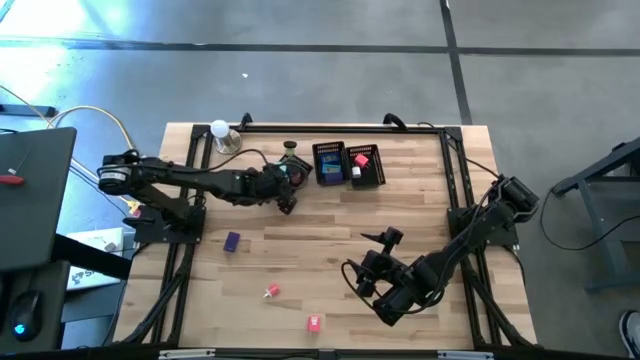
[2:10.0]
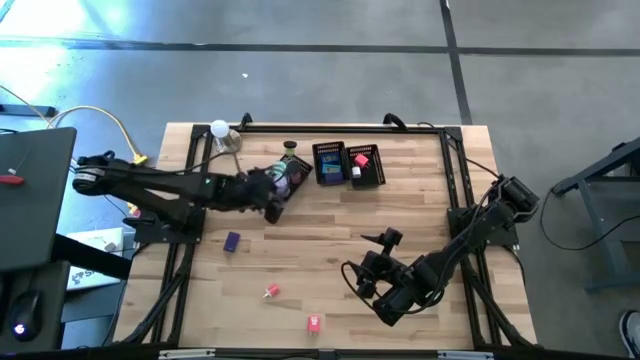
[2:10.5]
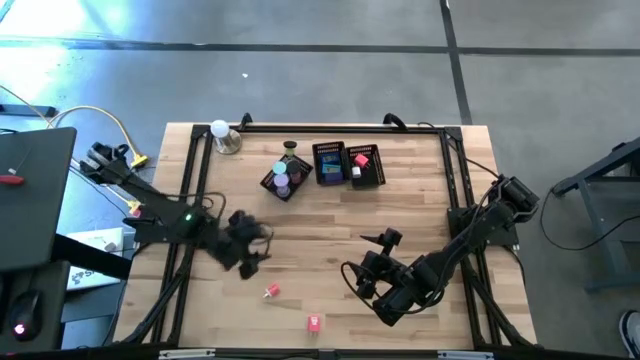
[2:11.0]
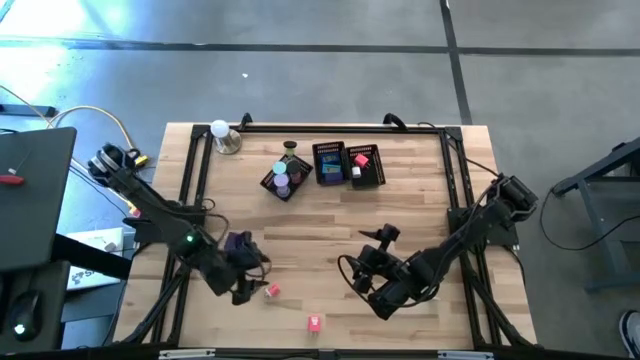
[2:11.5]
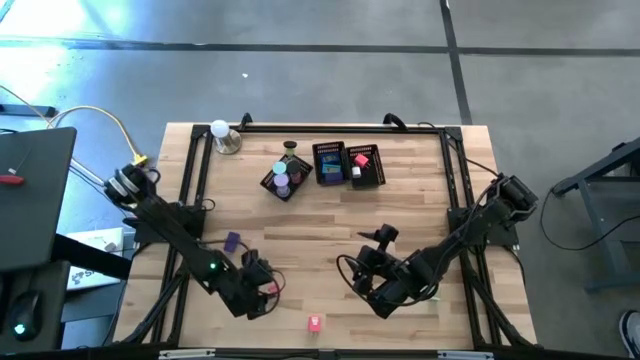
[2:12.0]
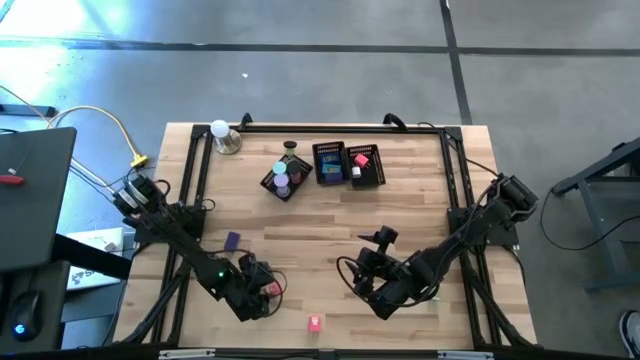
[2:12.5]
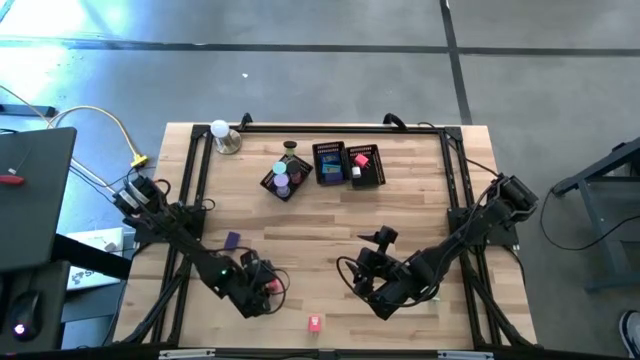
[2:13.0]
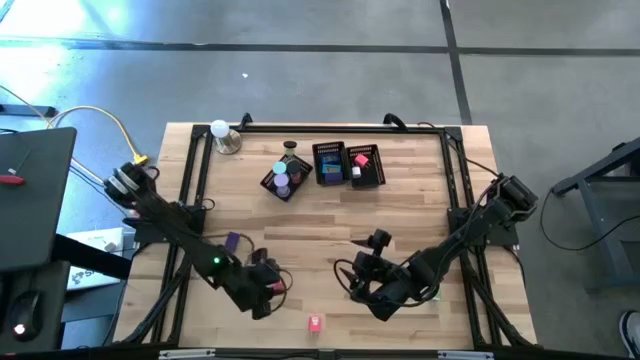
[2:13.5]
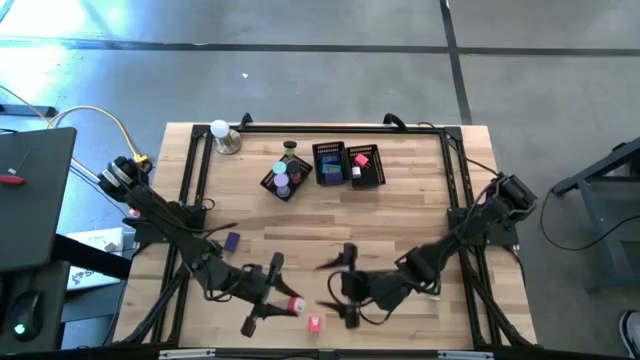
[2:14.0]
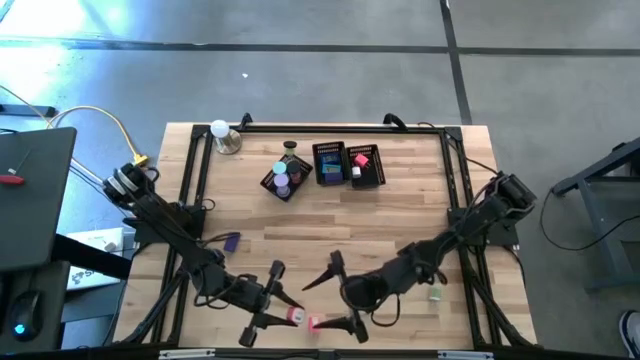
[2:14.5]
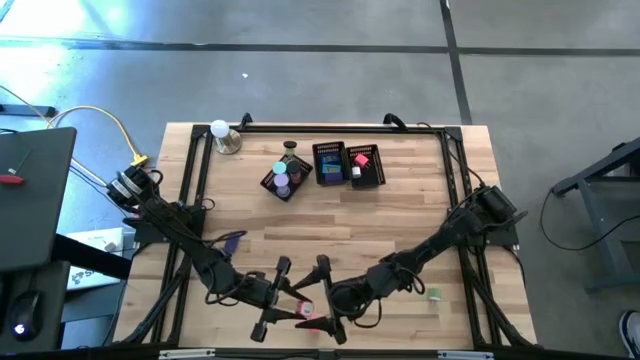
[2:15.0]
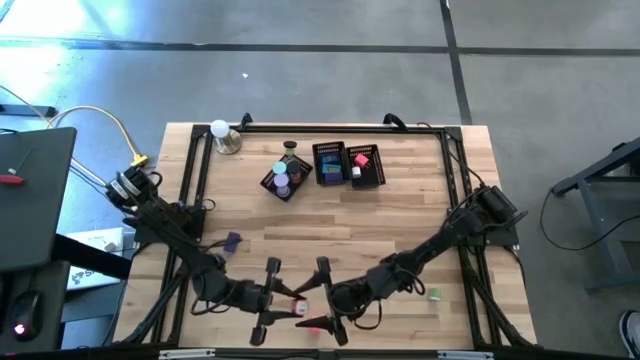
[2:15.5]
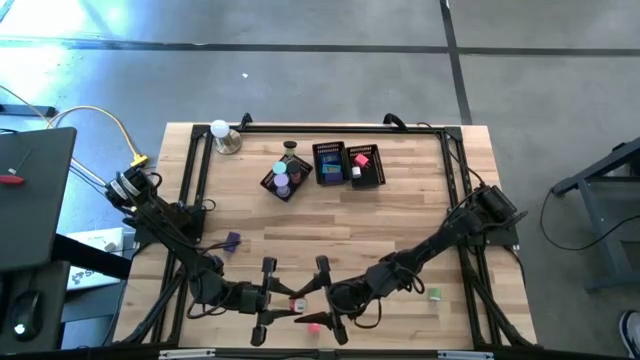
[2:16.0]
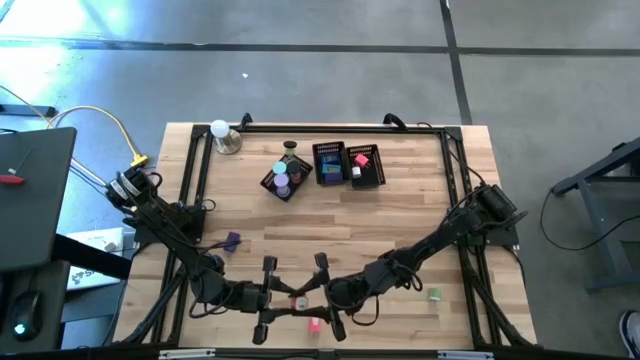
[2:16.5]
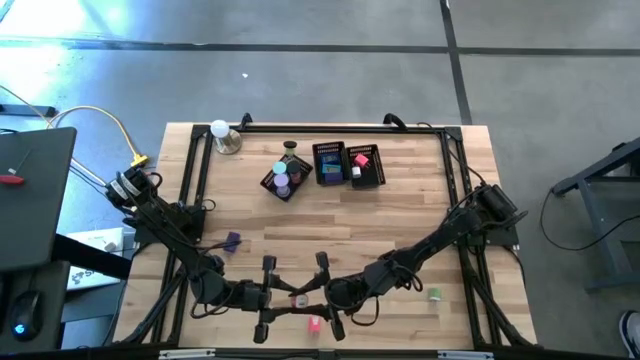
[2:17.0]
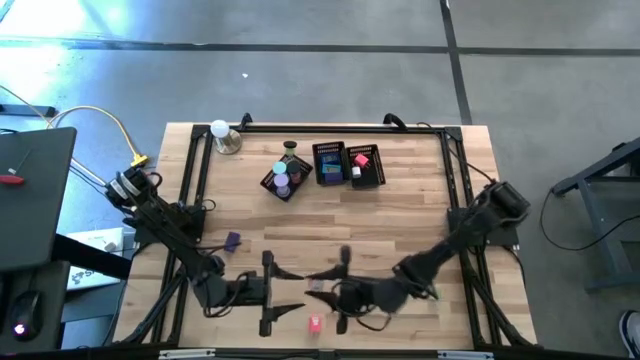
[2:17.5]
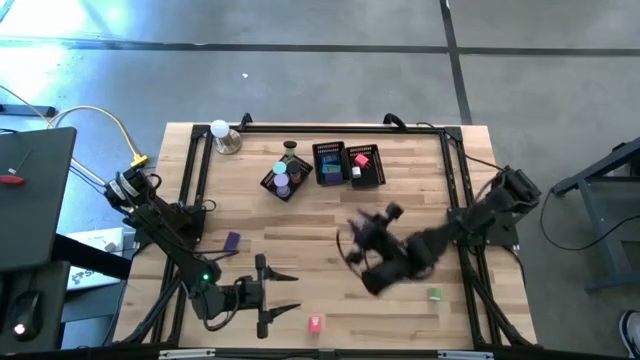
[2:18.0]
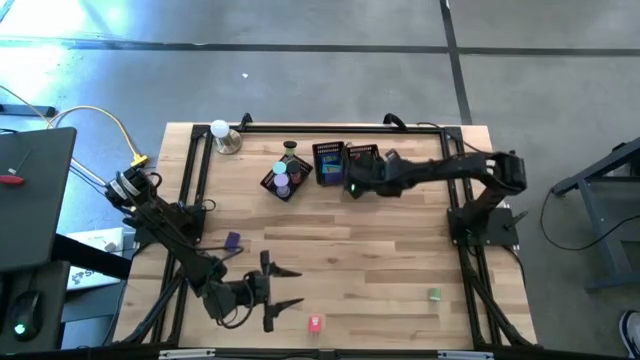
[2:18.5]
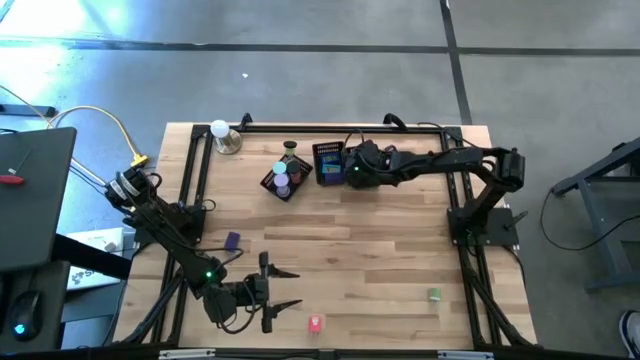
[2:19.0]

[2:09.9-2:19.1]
Task: Pick & Place Office items
Put the left pink charger adapter into the right black bin

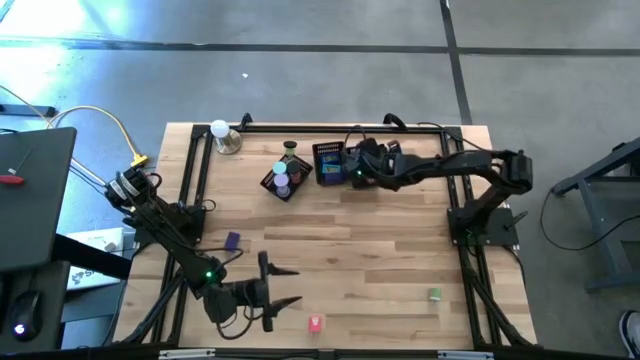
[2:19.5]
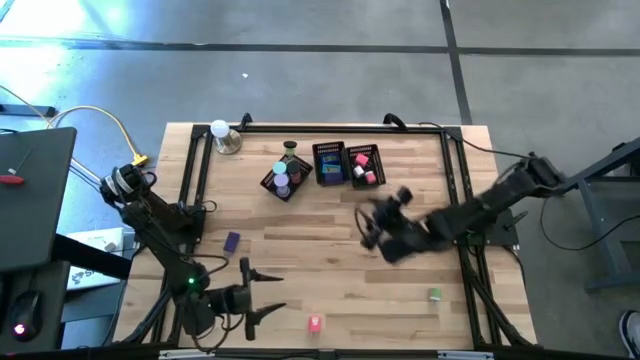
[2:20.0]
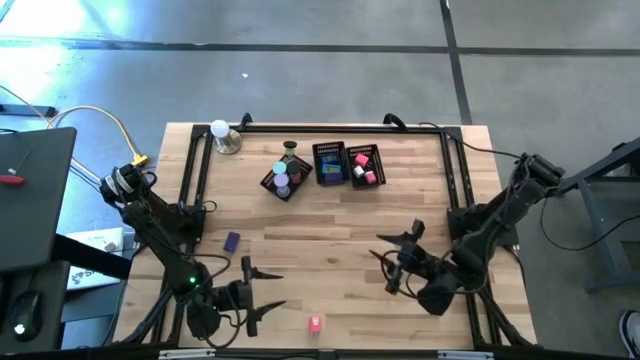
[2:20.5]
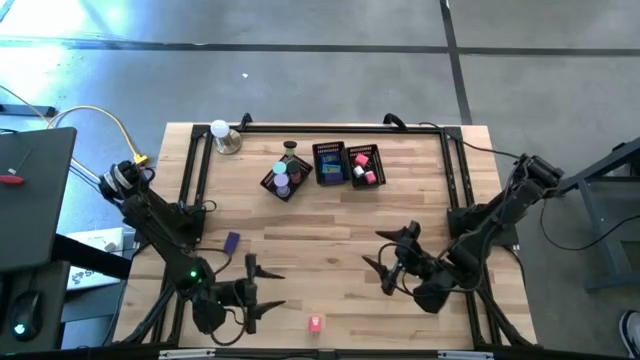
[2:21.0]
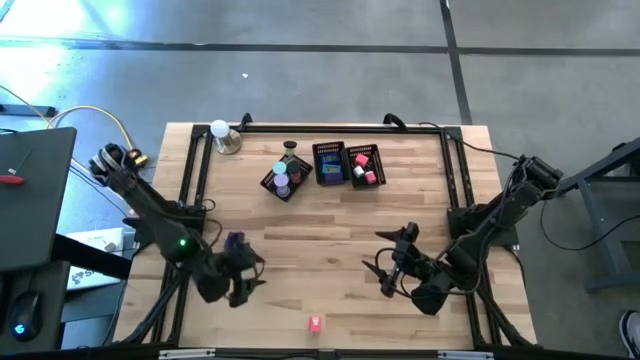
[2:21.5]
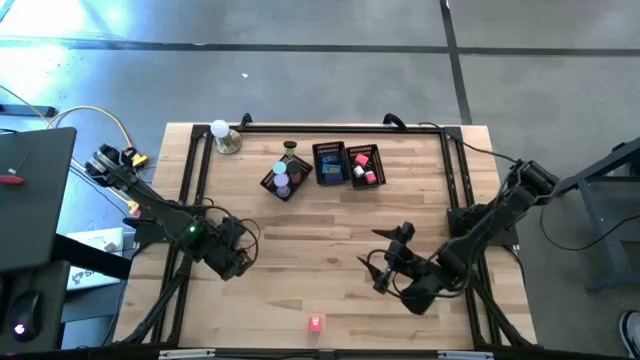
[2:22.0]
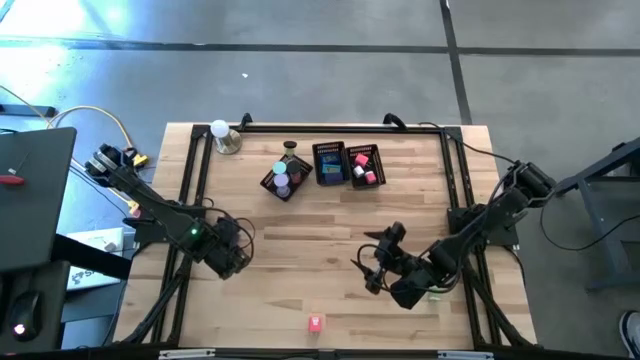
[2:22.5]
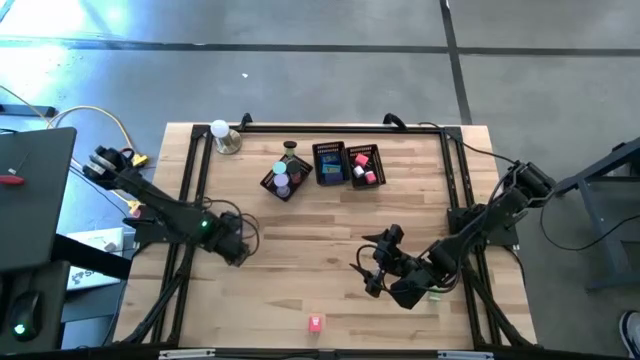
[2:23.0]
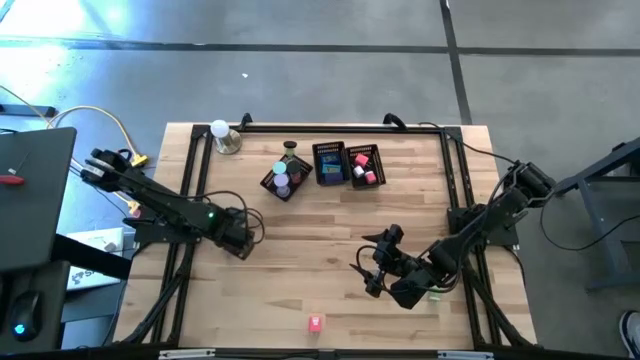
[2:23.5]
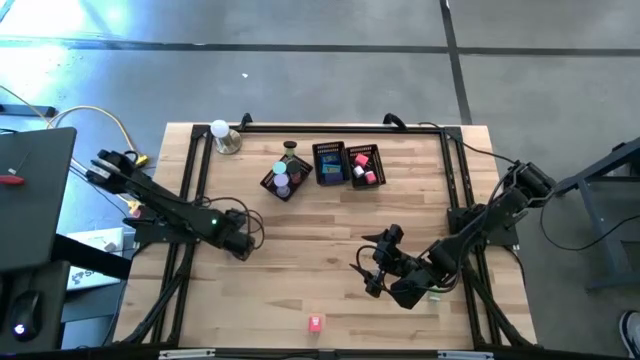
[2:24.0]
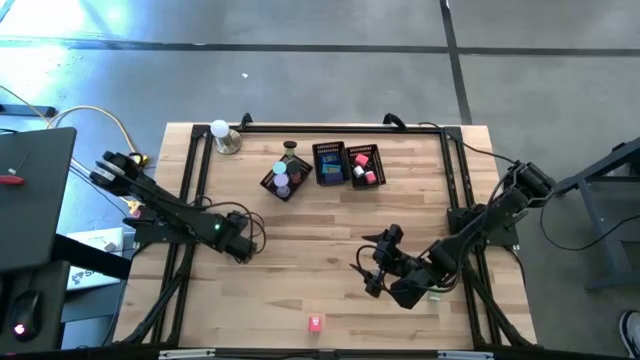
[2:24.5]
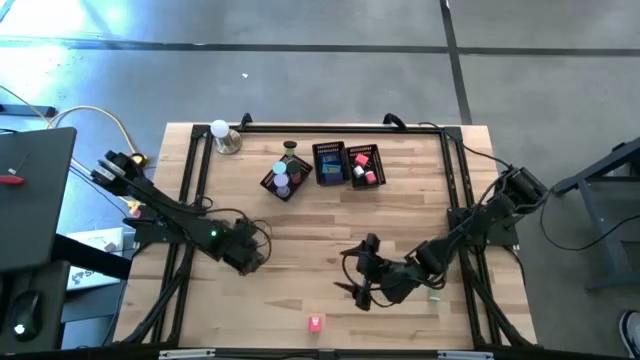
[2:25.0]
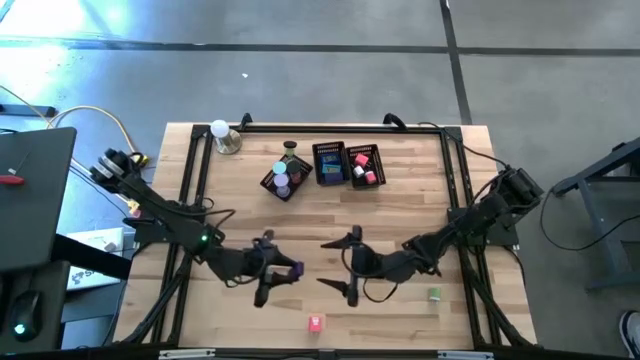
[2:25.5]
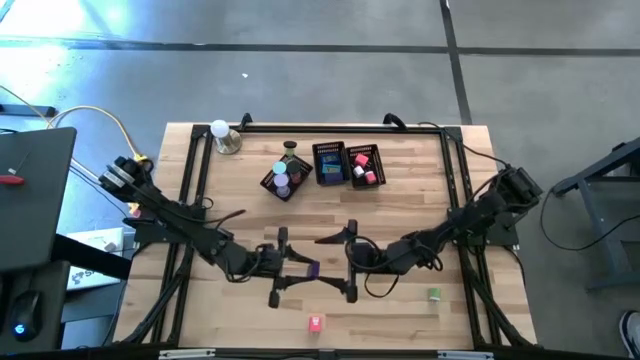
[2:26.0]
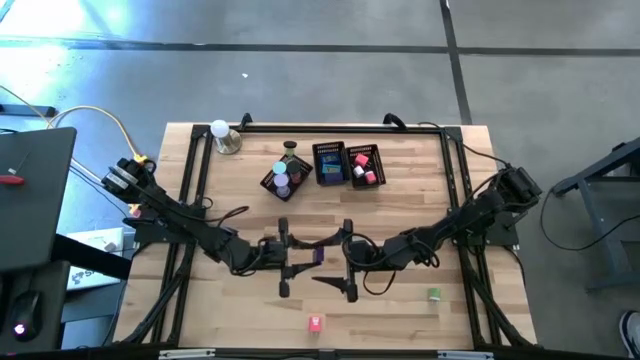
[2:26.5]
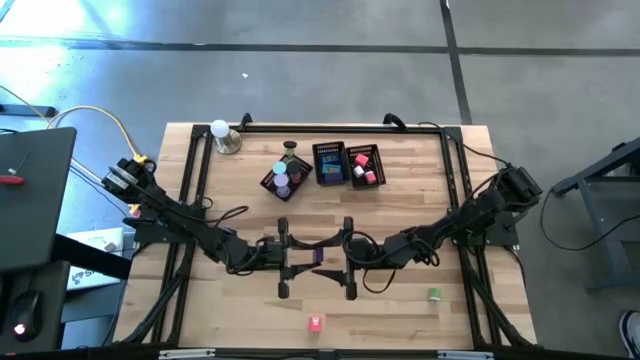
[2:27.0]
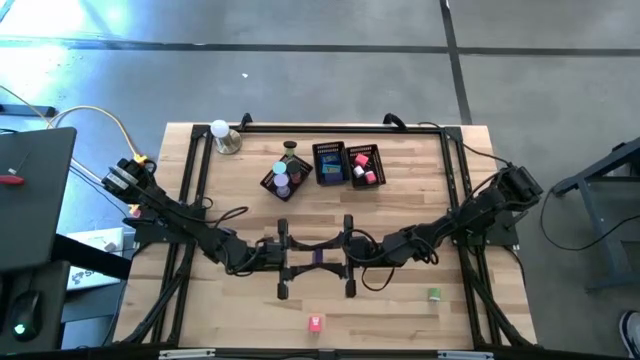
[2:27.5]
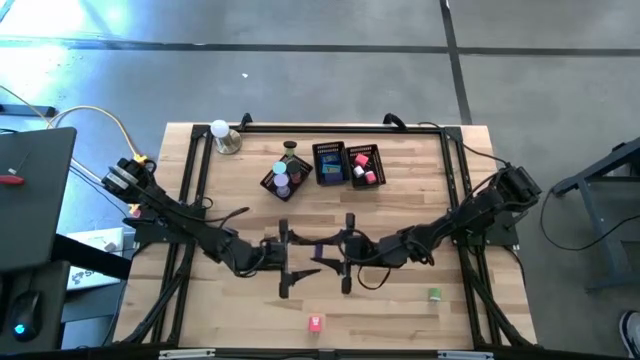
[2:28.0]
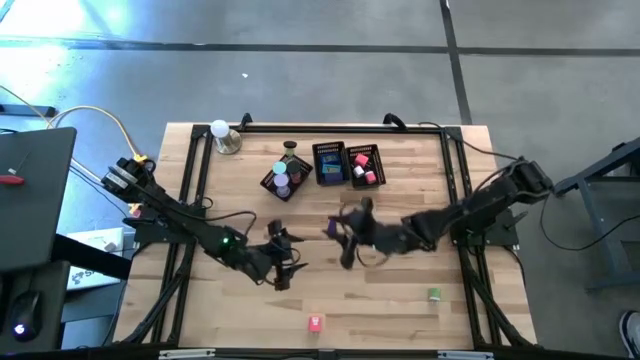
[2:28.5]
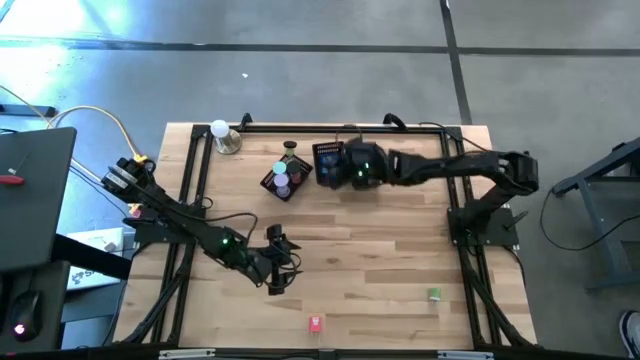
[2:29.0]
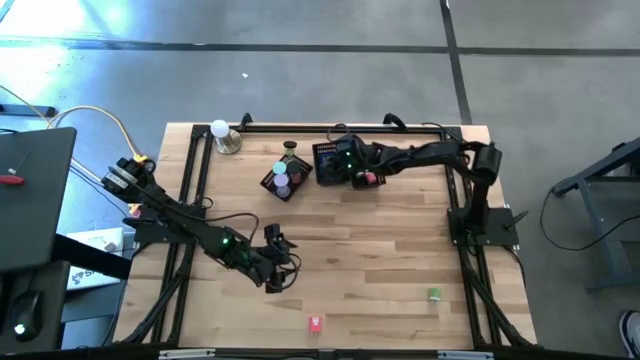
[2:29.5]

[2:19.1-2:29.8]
Put the purple digital timer into the middle black bin

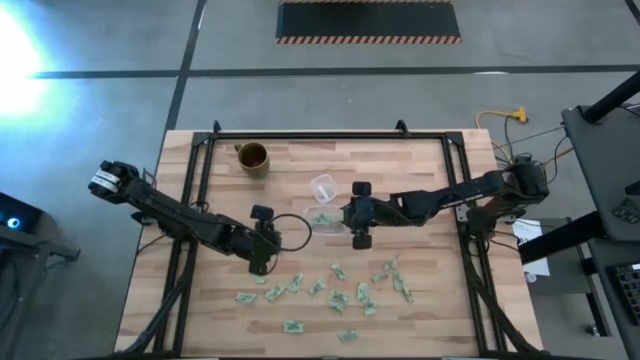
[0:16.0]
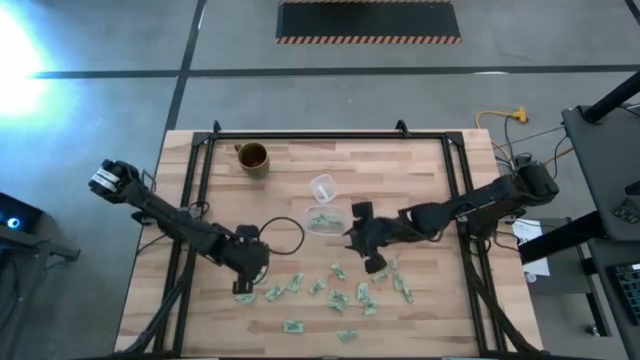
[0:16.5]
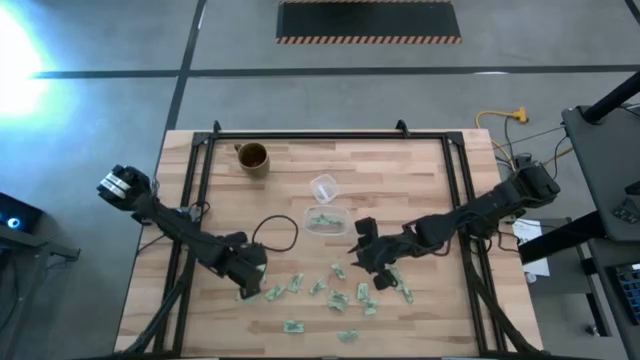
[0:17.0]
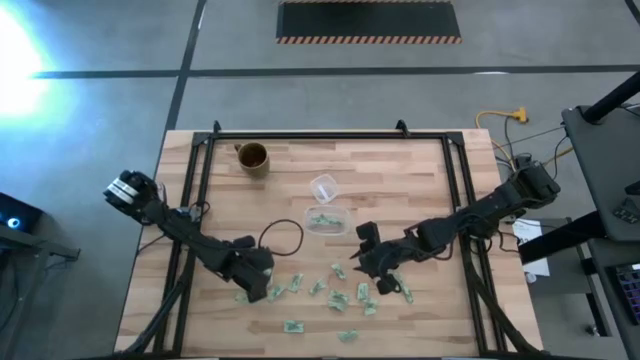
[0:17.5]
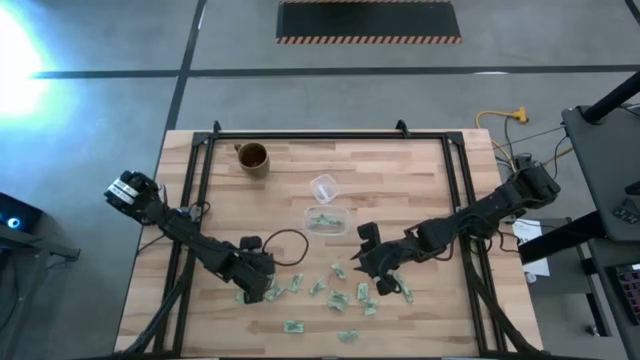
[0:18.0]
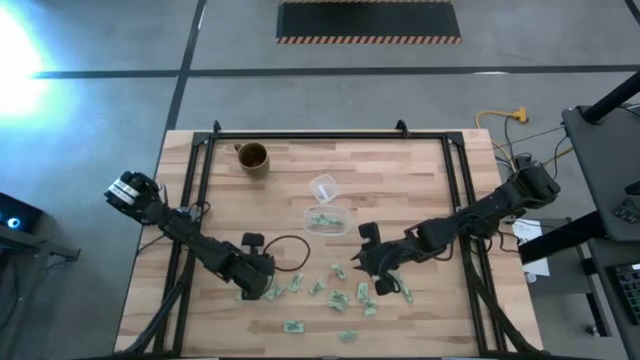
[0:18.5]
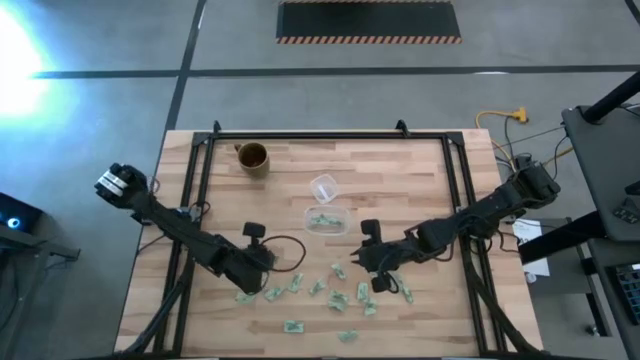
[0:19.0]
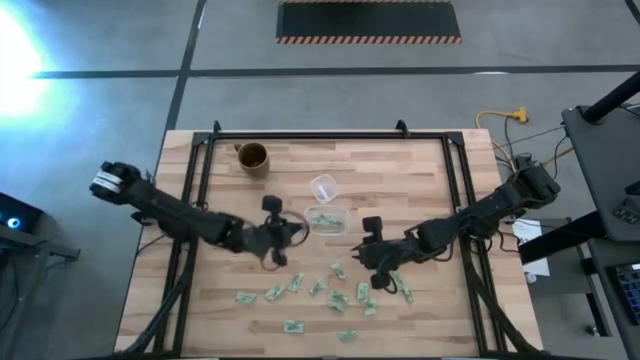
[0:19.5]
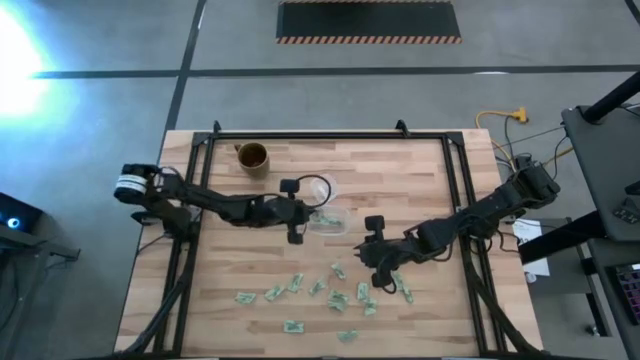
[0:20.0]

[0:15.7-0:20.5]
Task: Pick and place Stevia / Truvia into bins
Put the stevia packet into the bottom transparent container
